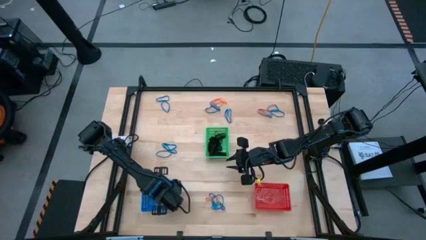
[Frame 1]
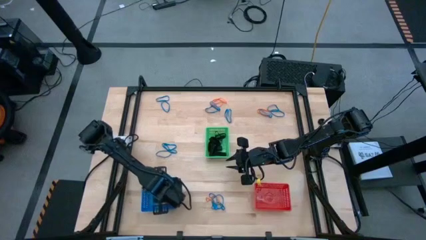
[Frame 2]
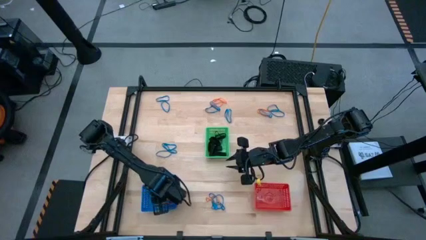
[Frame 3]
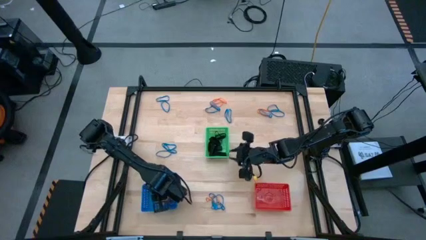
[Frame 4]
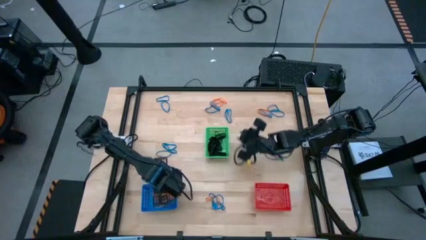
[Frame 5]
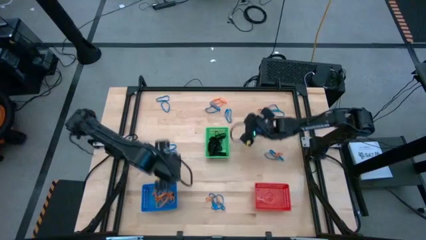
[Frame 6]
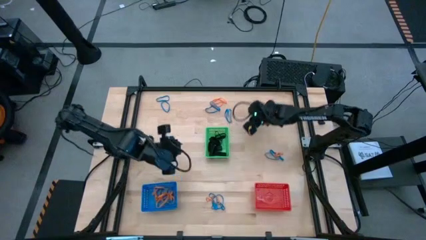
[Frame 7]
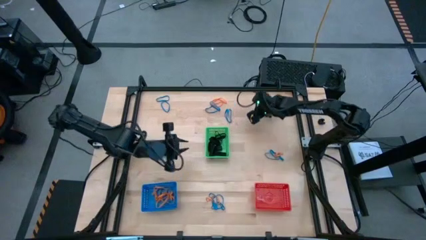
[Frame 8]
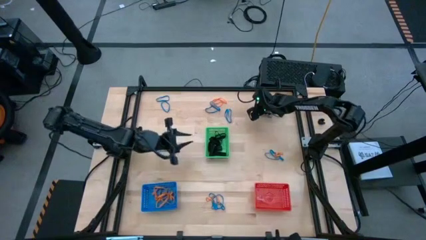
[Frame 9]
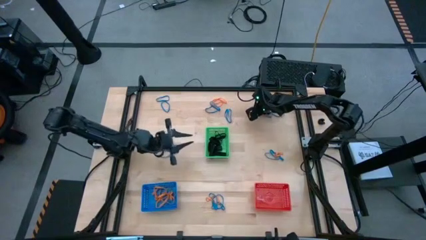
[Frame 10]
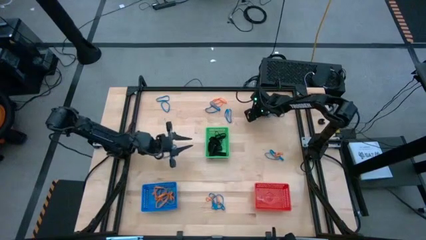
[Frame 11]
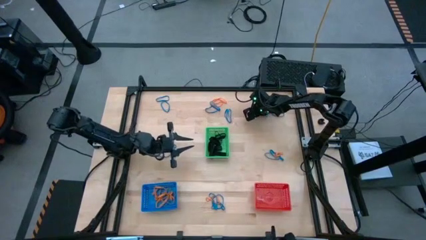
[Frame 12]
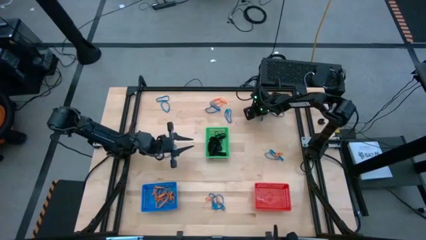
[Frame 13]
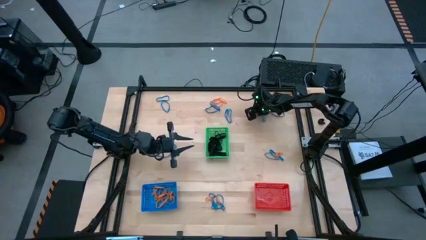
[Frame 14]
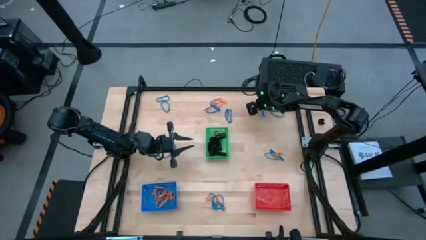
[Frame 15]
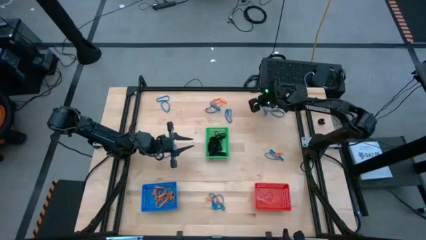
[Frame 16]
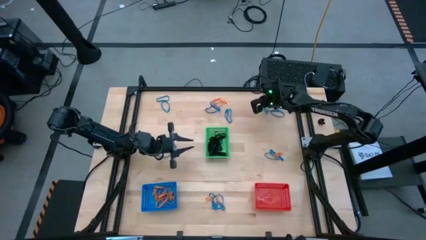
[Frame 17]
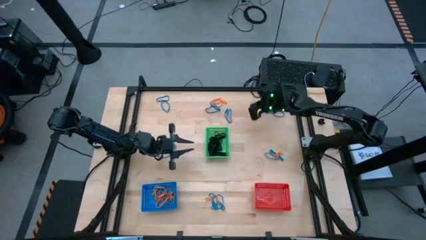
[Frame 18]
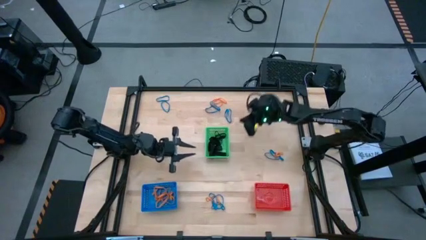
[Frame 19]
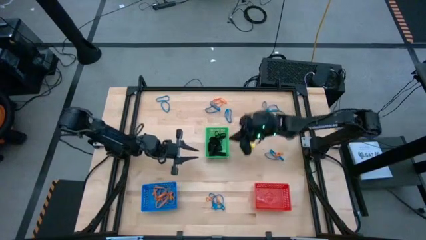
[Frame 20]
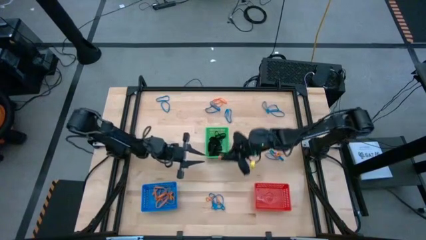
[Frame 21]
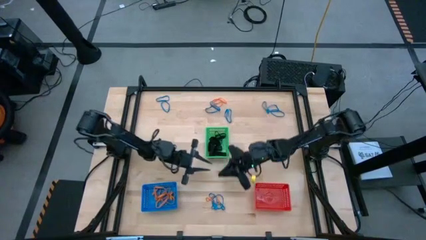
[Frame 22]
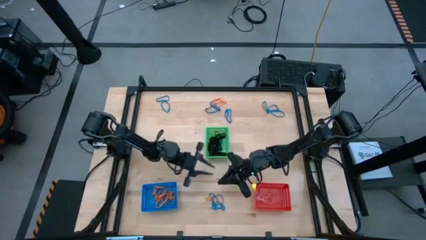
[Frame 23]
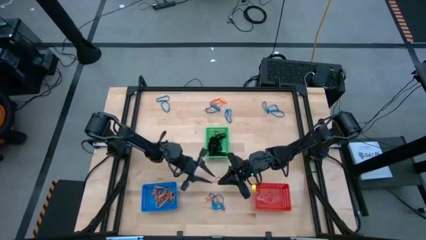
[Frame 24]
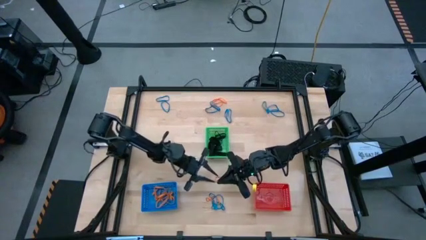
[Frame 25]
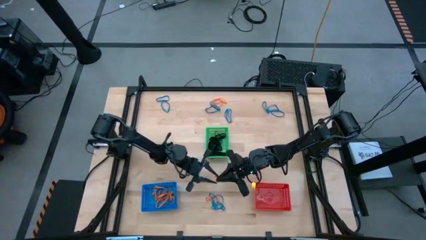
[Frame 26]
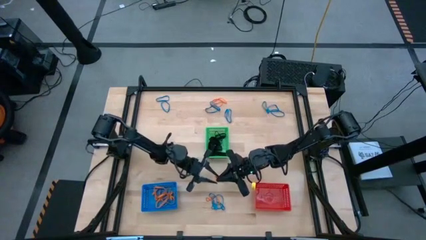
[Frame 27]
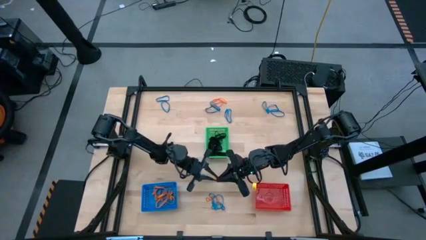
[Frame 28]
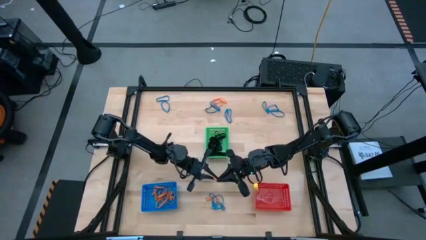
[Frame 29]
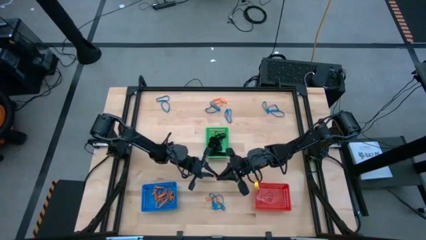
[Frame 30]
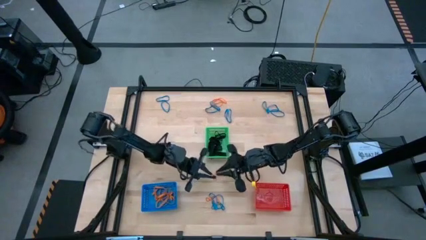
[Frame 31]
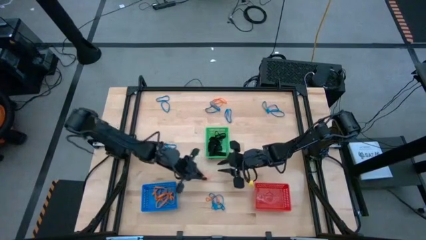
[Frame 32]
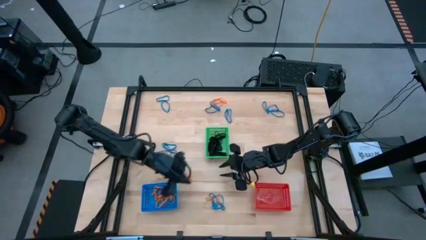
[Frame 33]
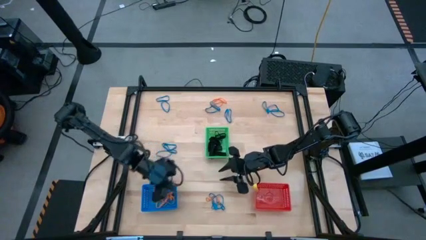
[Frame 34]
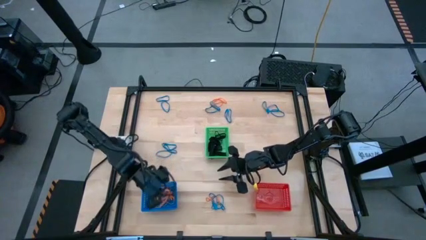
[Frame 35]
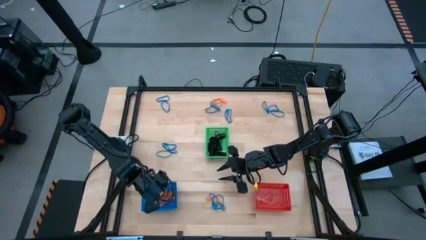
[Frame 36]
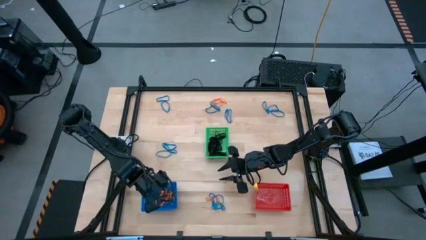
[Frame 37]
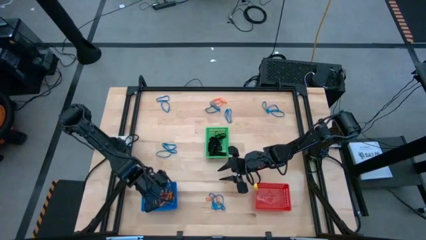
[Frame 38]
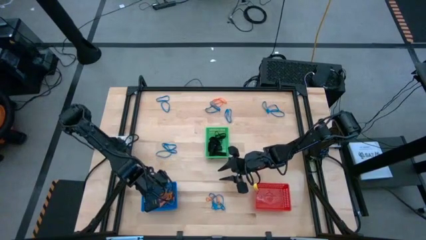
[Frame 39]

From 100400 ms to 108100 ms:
Task: Sort rubber bands into baskets
Put the orange rubber band into the blue bin

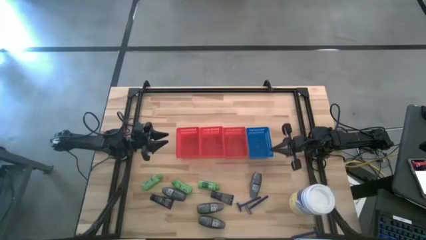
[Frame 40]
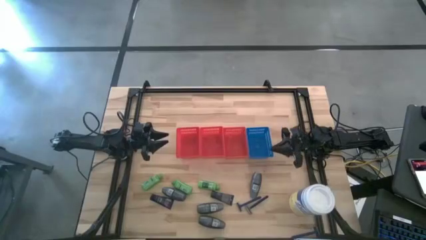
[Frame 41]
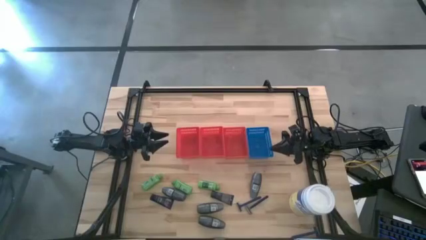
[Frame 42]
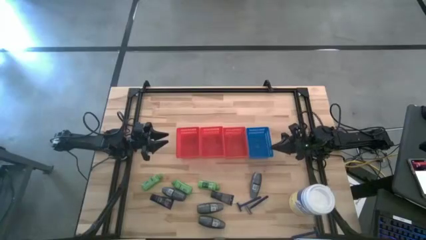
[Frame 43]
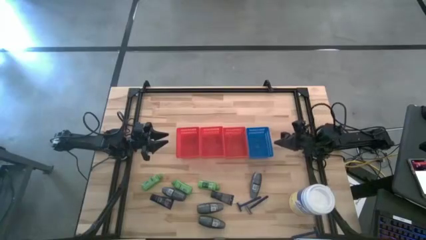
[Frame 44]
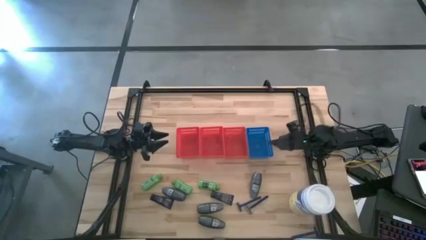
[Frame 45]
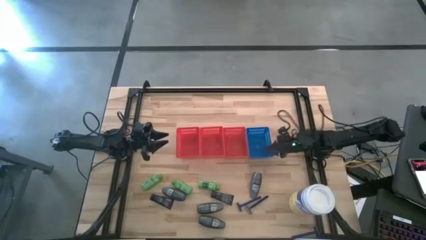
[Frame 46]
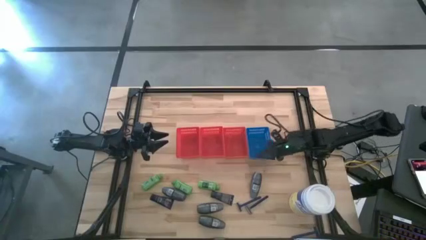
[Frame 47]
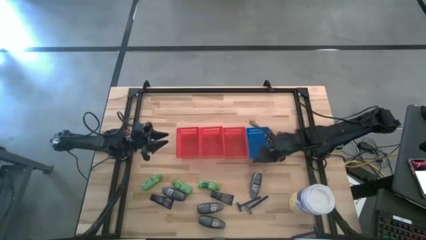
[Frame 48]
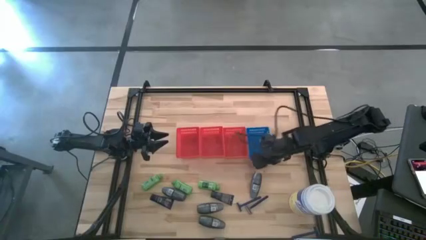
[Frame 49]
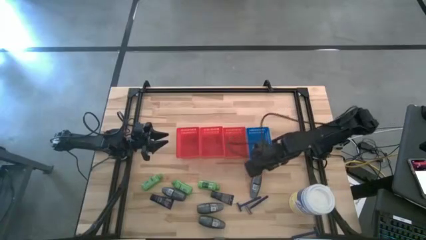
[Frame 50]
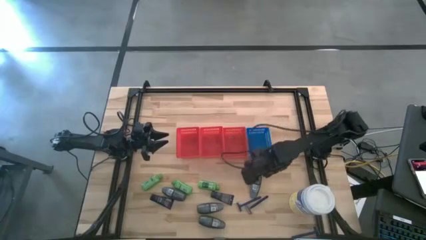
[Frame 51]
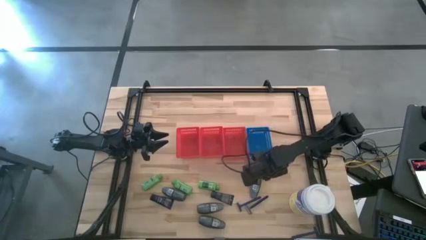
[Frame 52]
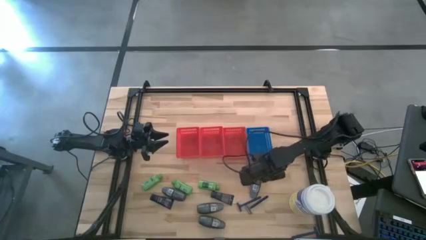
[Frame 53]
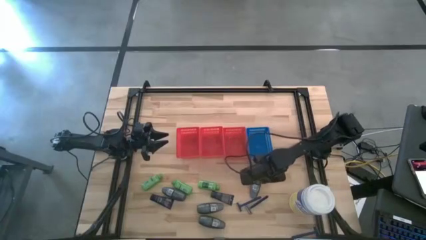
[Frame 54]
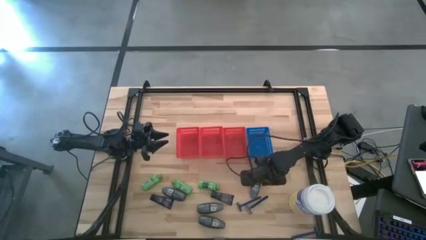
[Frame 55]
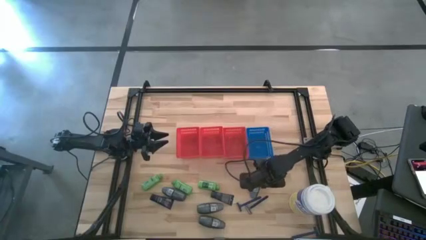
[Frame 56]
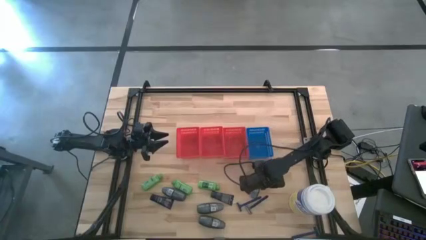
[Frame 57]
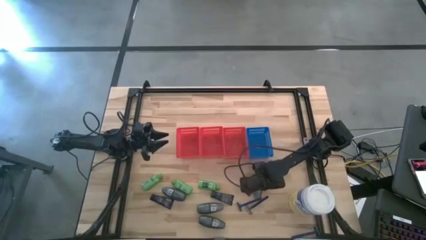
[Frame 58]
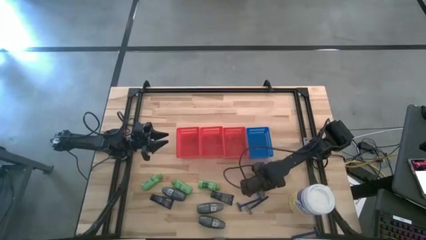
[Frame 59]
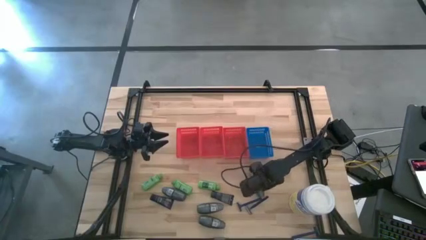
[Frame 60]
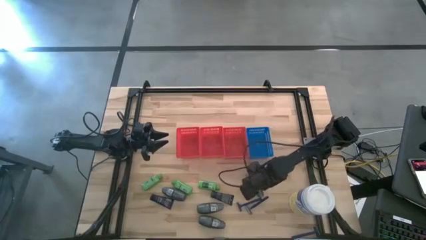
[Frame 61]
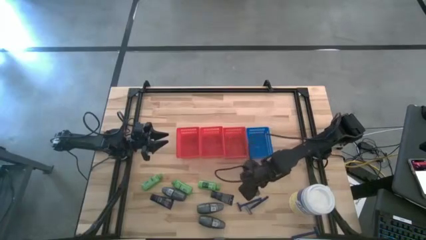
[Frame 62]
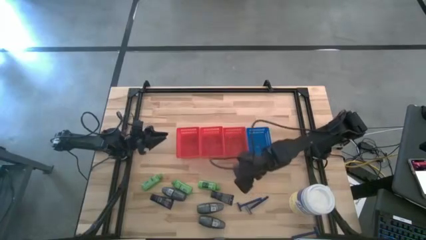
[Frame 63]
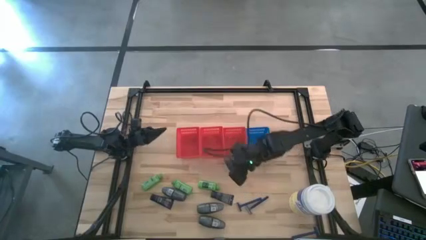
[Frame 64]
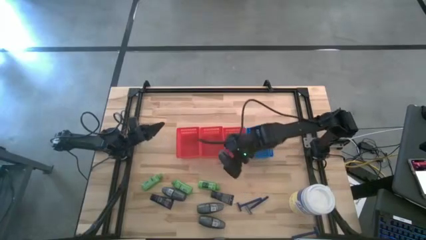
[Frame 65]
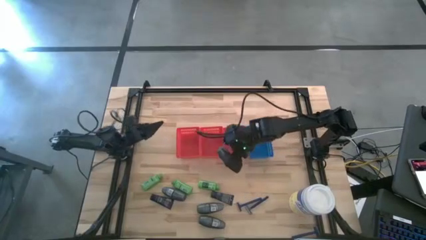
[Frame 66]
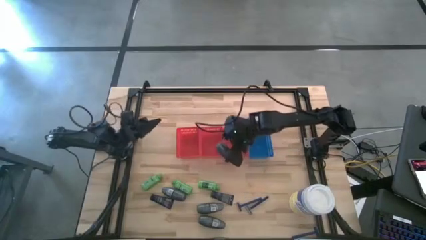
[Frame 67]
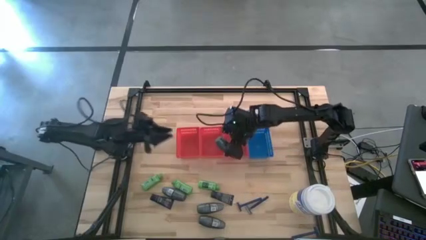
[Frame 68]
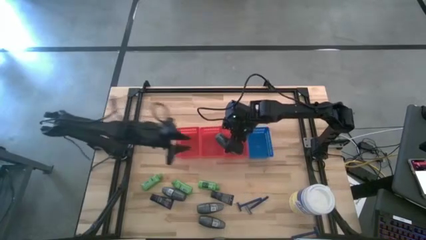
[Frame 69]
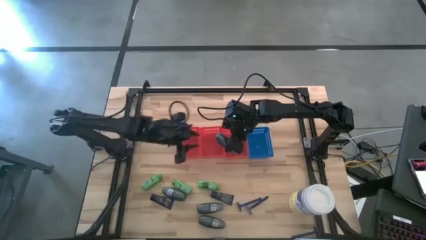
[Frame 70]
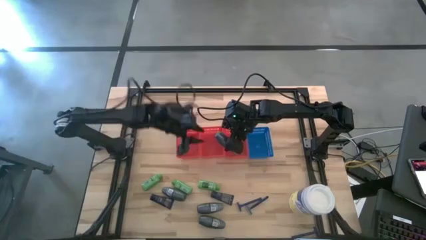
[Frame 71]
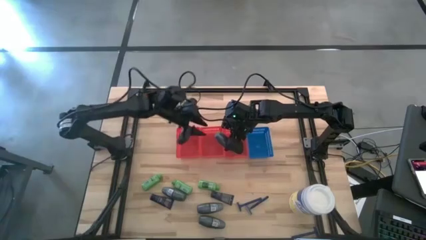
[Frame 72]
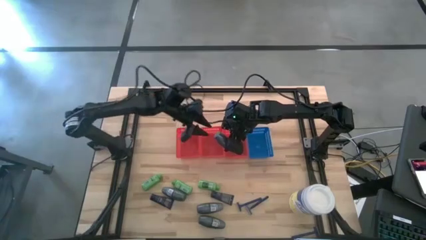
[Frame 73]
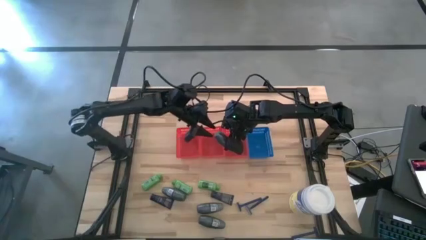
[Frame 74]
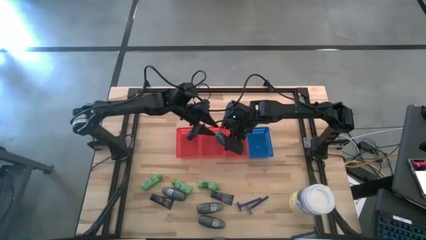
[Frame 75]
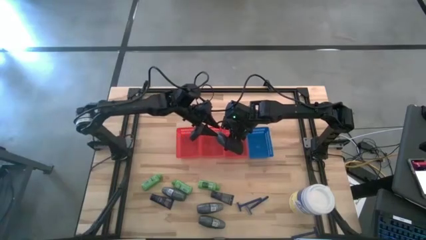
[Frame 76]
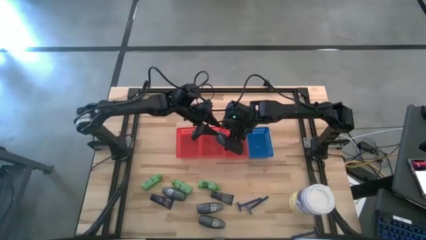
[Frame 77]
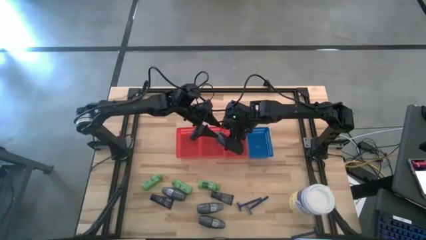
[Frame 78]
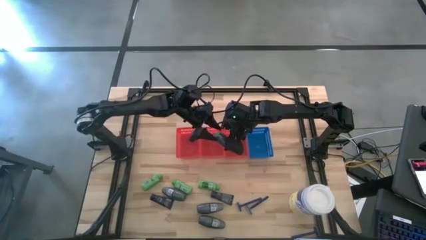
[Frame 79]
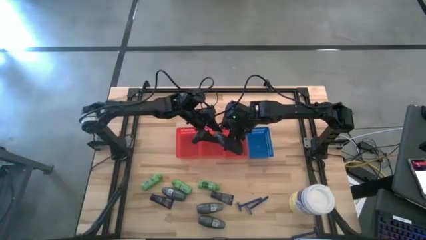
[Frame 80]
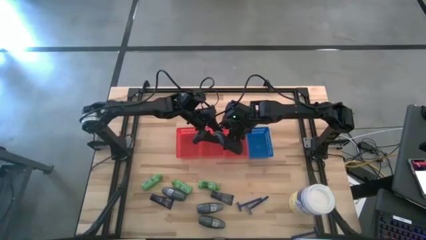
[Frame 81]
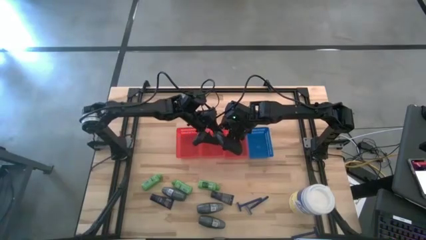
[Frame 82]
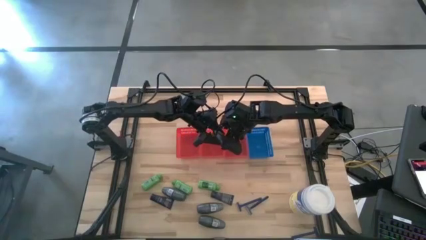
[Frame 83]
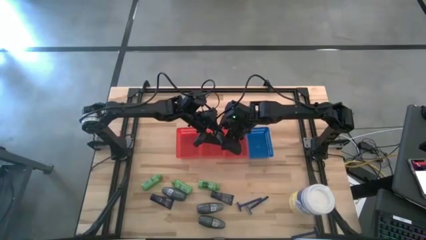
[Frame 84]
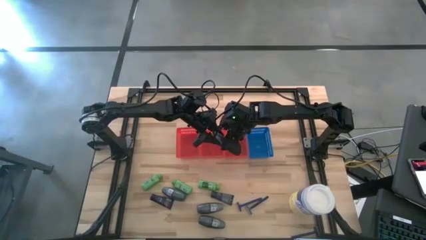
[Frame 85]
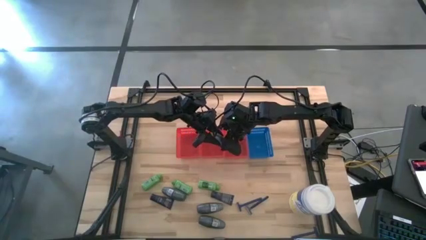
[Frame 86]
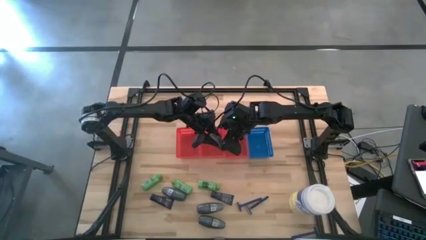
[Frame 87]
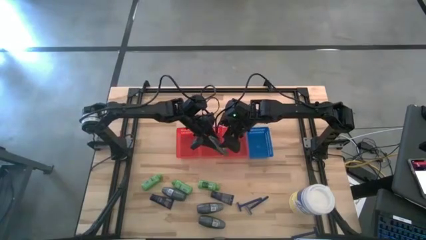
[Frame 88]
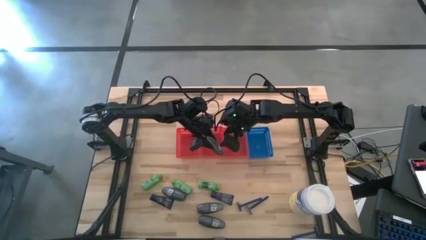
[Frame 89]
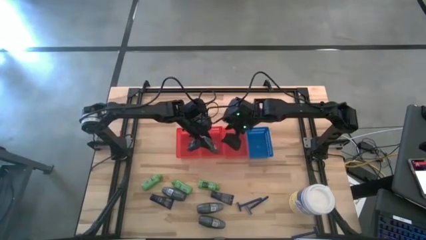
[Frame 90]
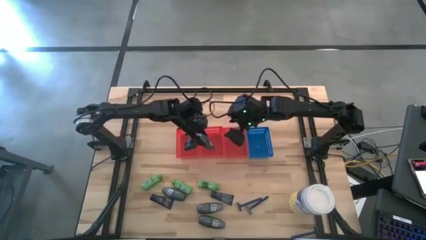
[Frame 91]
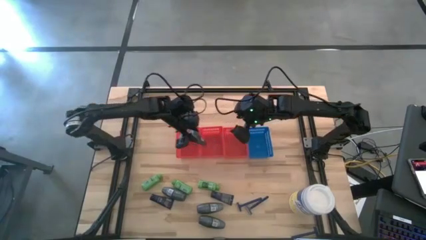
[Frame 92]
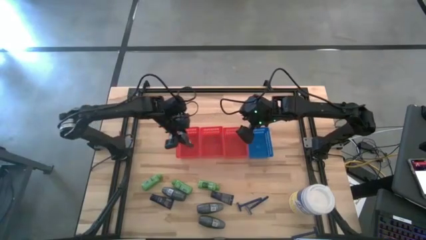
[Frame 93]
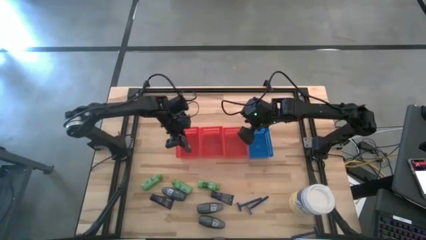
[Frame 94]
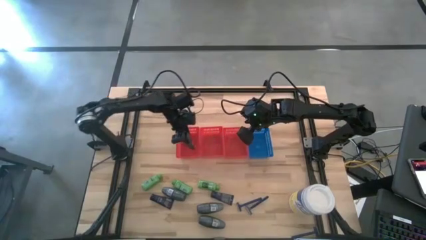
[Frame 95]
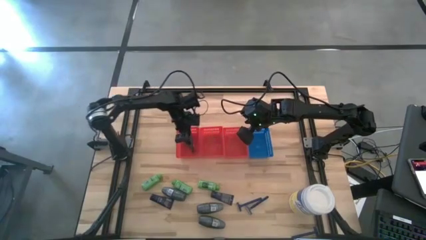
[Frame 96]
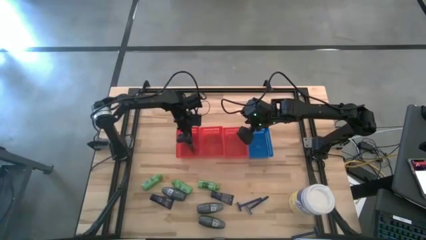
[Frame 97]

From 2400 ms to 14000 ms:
Task: Pick & Place Travel size toiletries
Put the black deodorant into the left red bin
